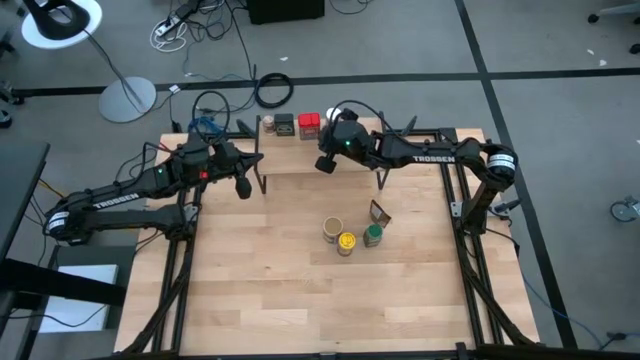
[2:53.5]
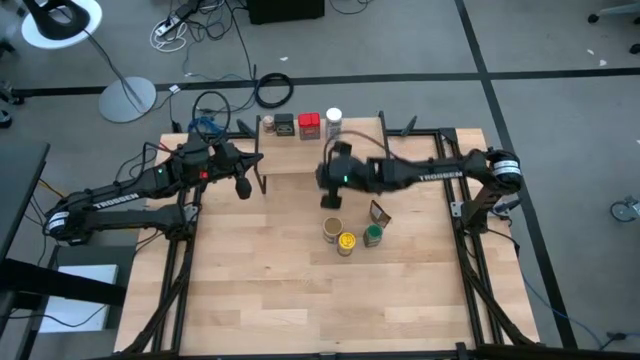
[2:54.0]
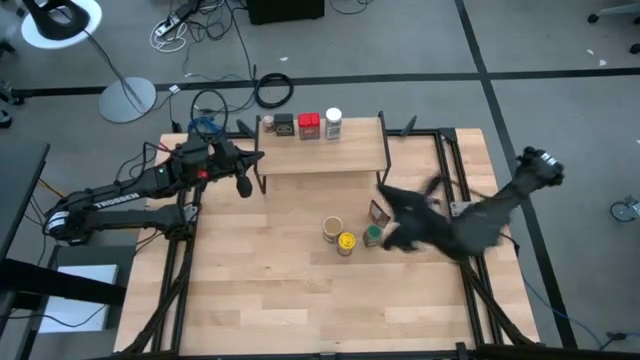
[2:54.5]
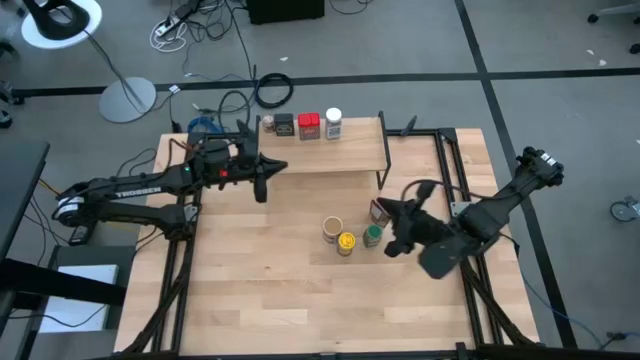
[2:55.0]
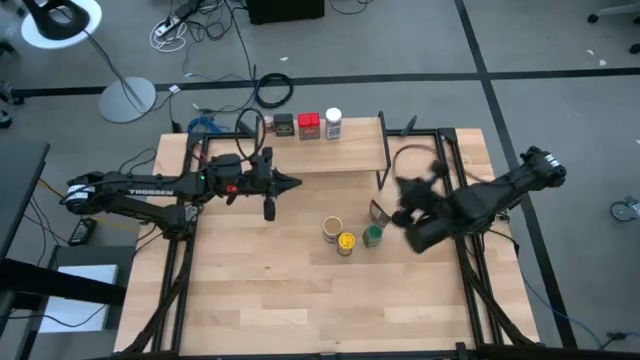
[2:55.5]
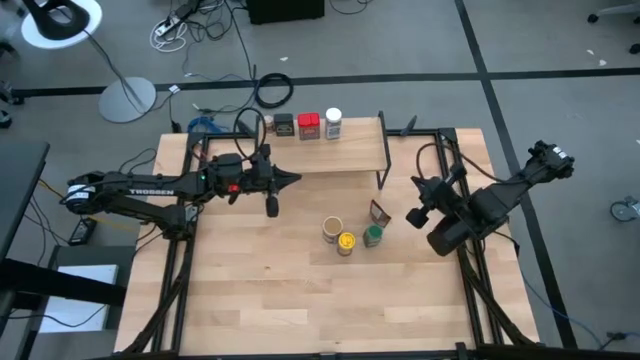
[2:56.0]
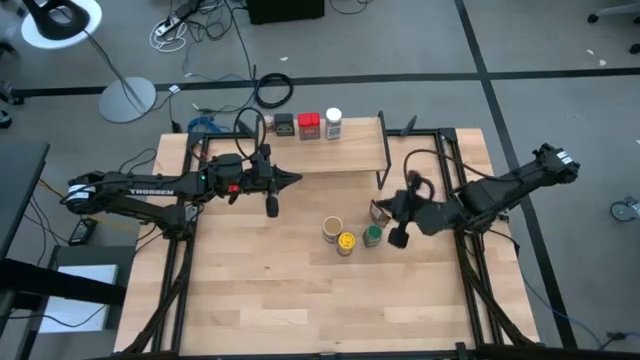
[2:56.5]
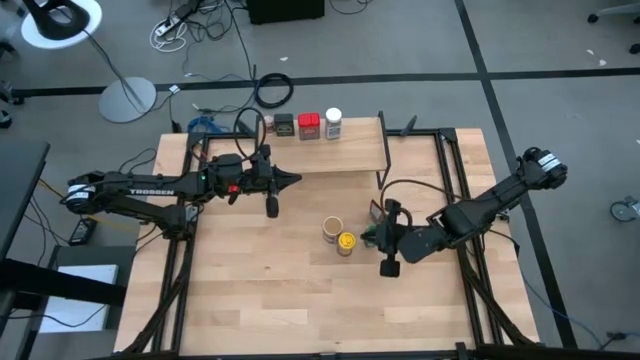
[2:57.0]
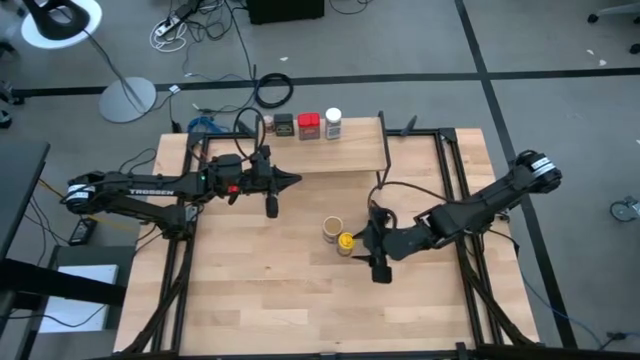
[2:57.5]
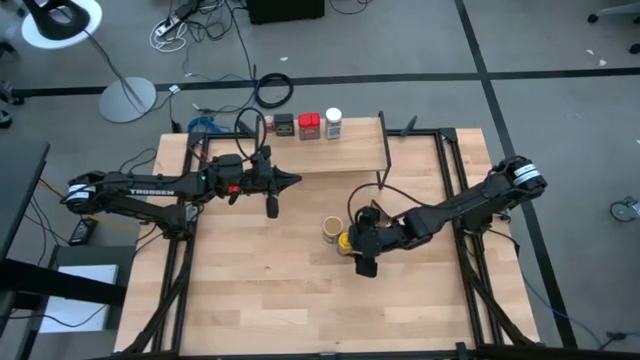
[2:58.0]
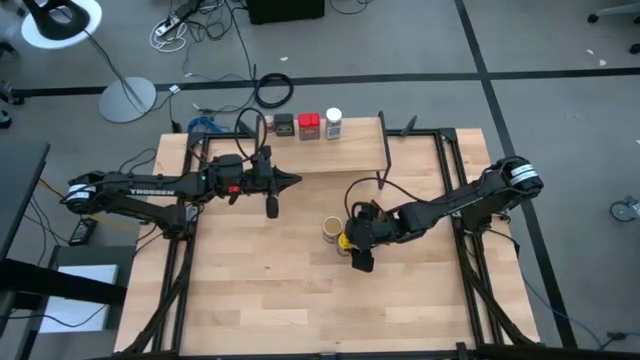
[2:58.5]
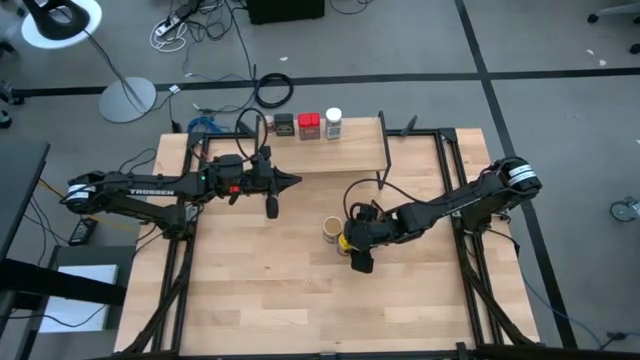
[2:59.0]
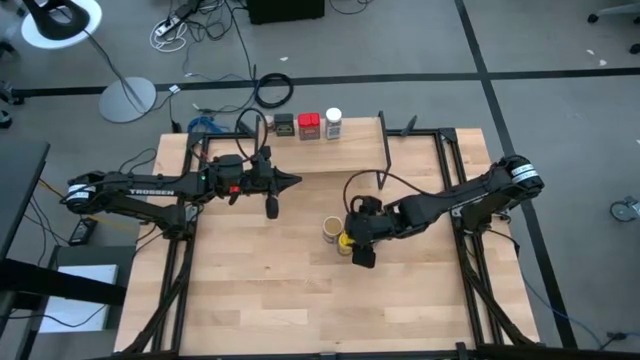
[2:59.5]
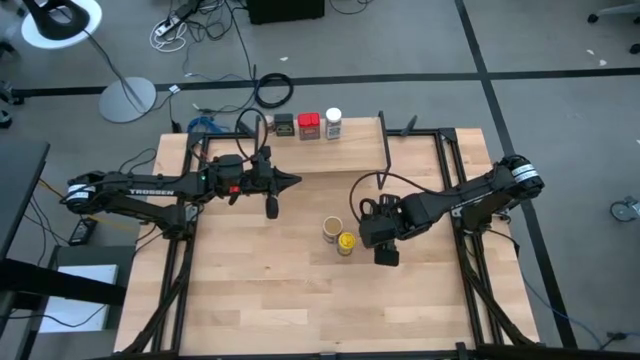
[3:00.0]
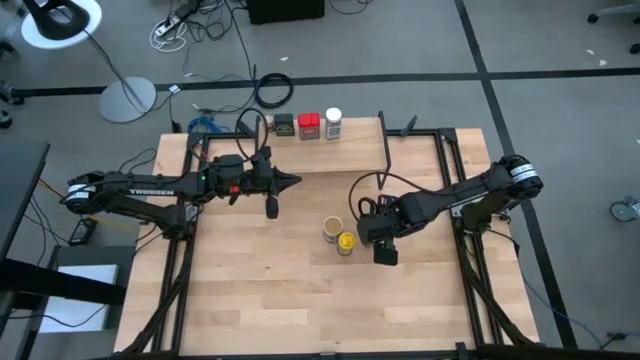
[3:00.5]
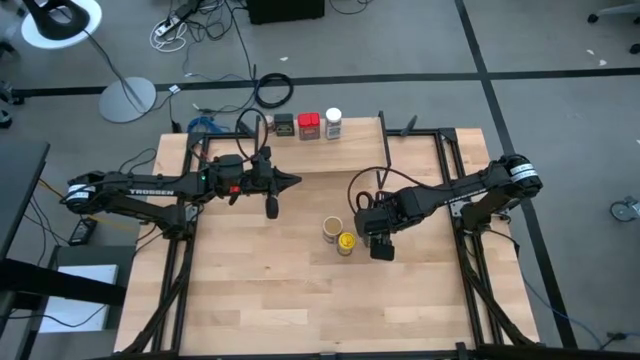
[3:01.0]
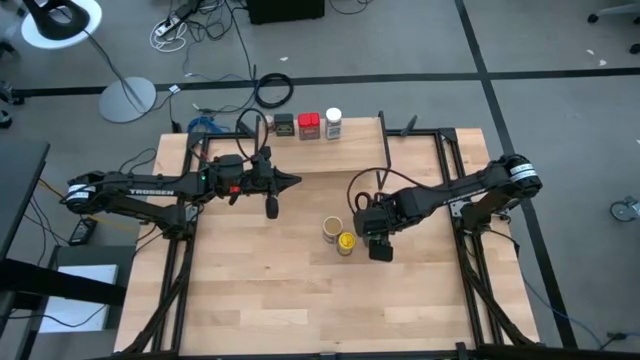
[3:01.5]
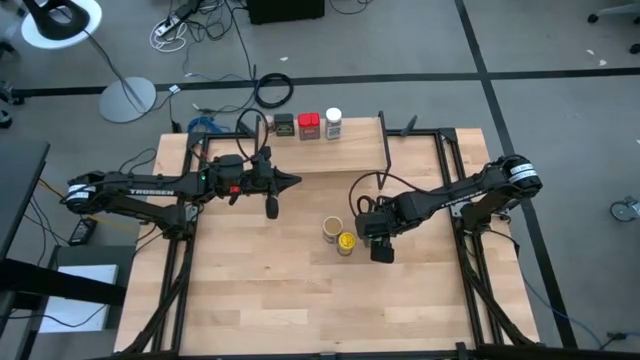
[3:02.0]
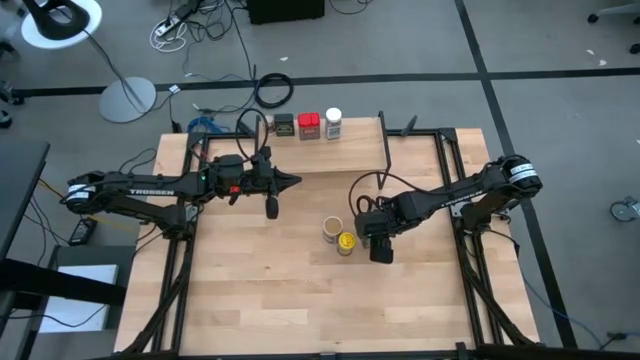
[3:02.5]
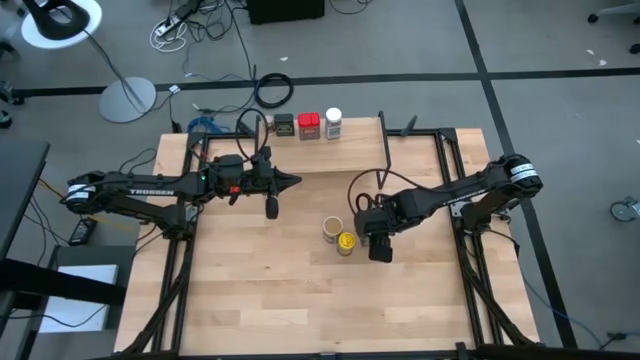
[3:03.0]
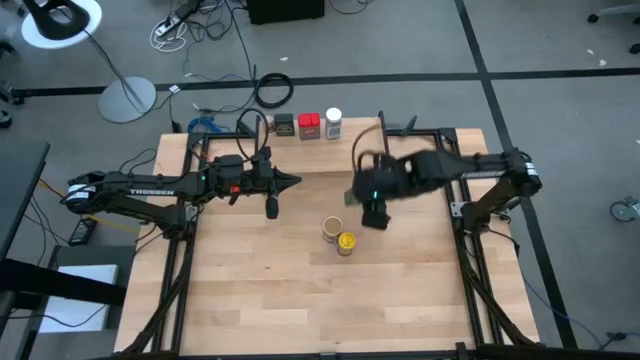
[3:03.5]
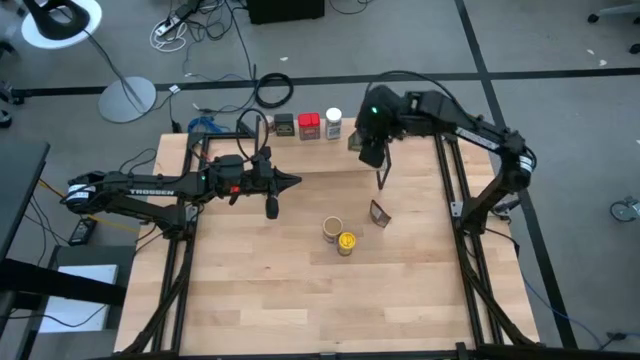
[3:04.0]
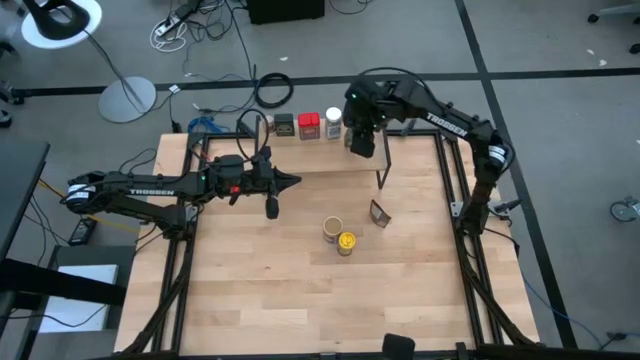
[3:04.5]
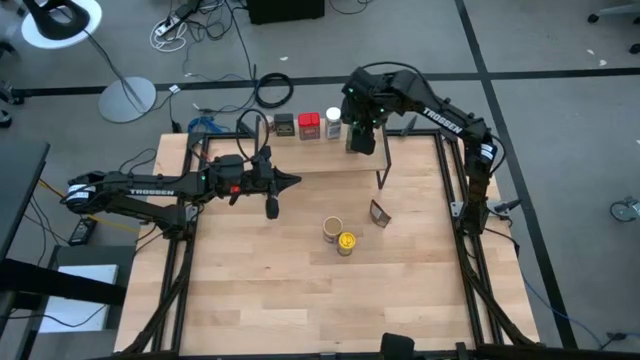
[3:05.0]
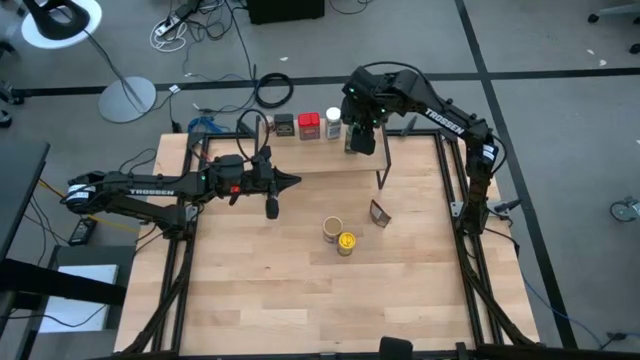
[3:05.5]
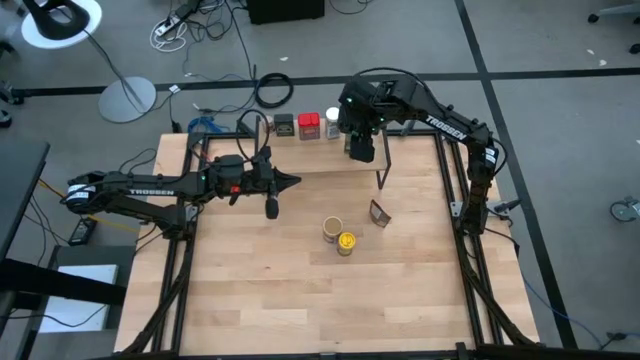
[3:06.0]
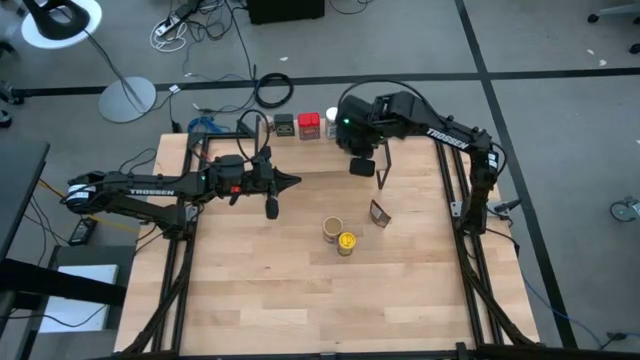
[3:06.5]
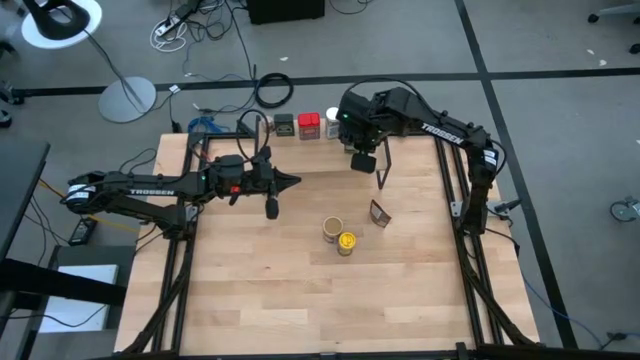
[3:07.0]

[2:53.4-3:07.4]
Task: Shelf spices
Put the green seasoning bottle on the shelf

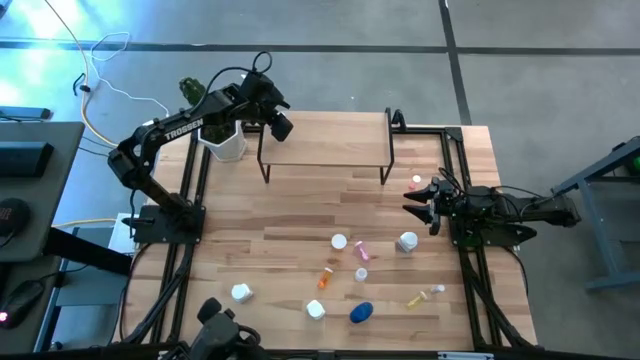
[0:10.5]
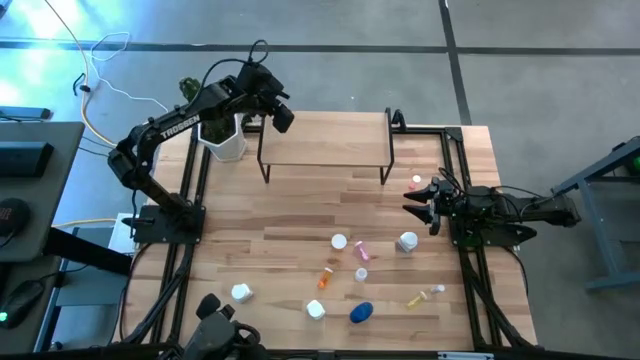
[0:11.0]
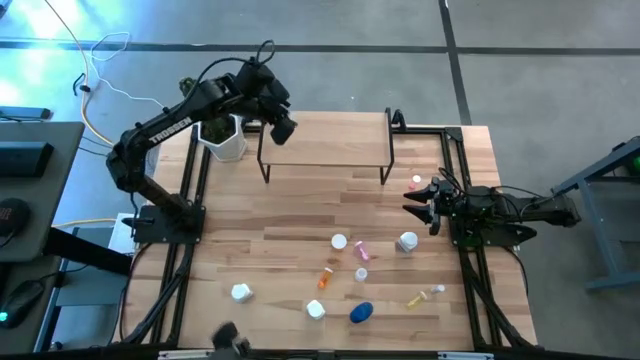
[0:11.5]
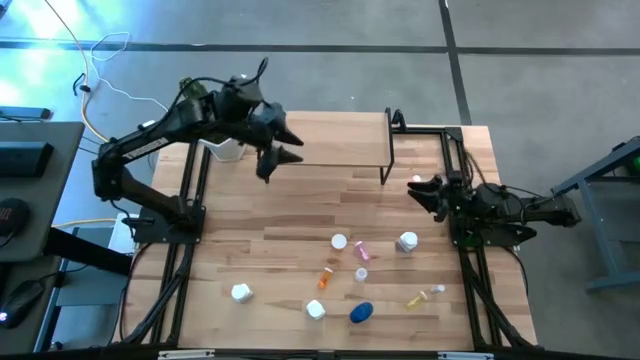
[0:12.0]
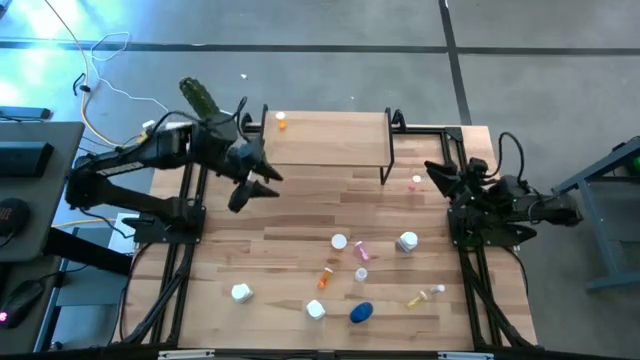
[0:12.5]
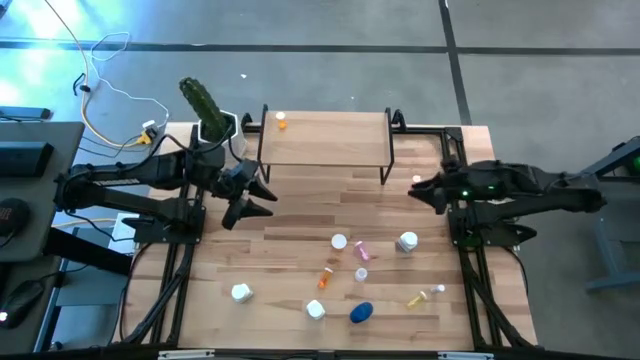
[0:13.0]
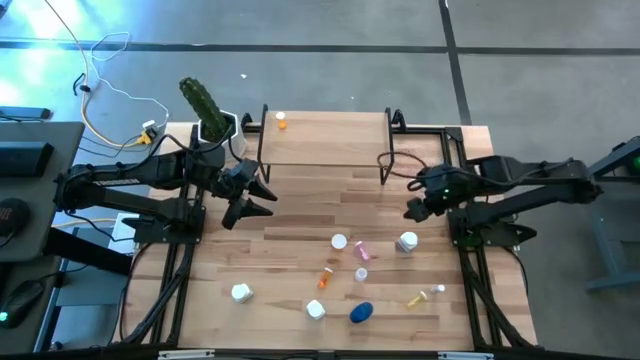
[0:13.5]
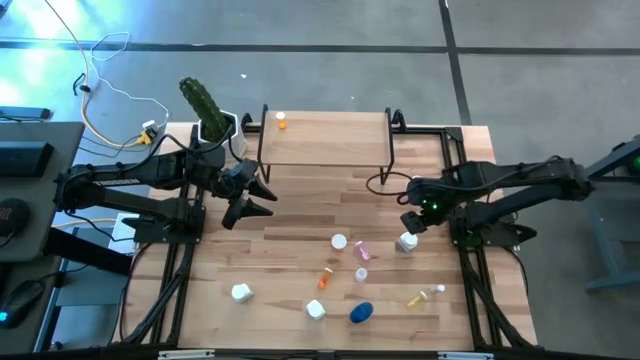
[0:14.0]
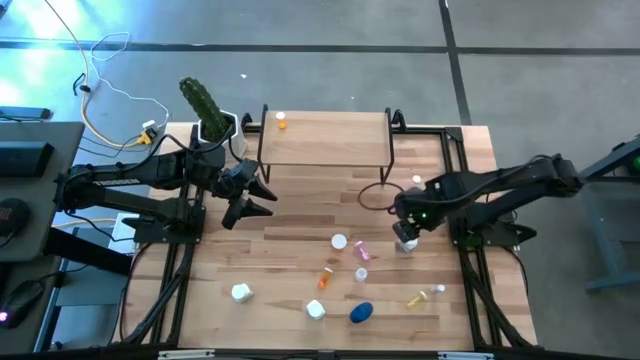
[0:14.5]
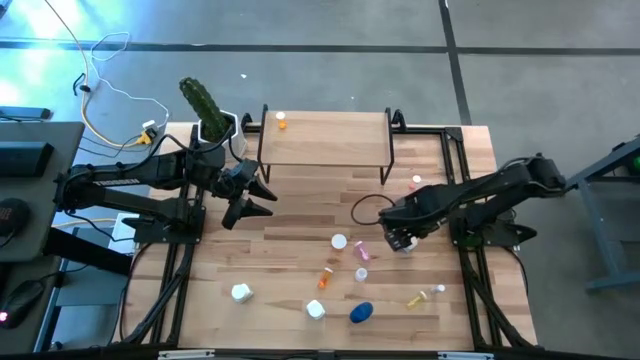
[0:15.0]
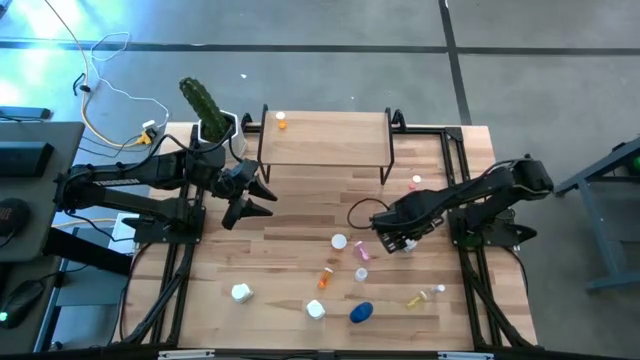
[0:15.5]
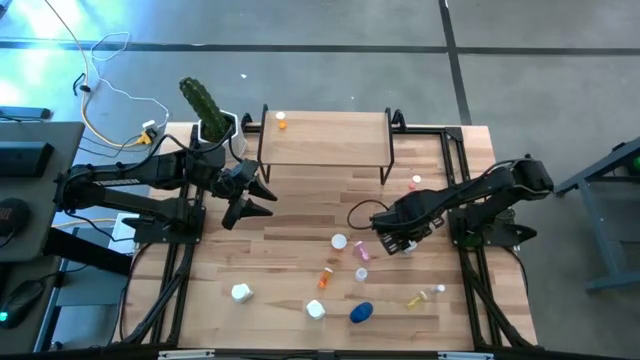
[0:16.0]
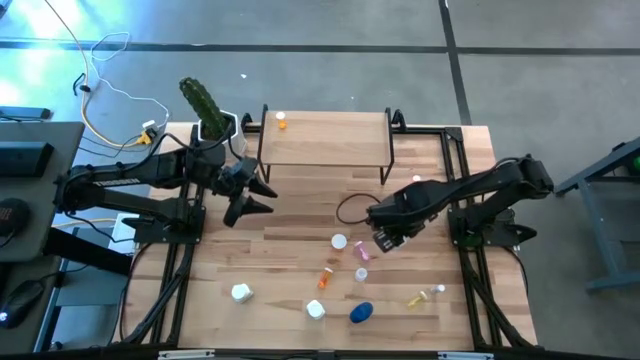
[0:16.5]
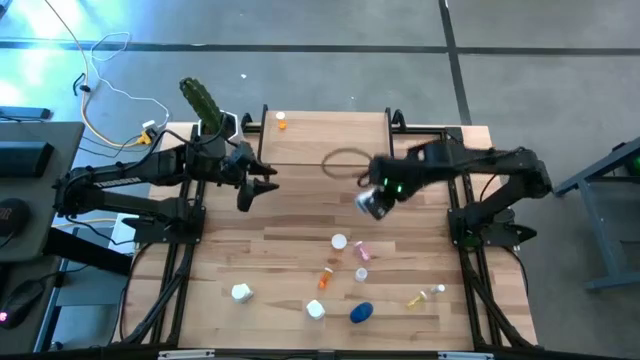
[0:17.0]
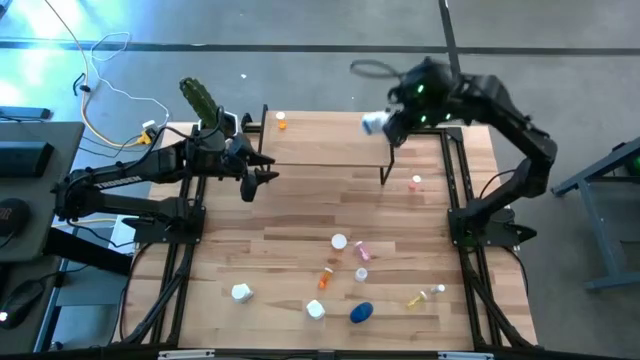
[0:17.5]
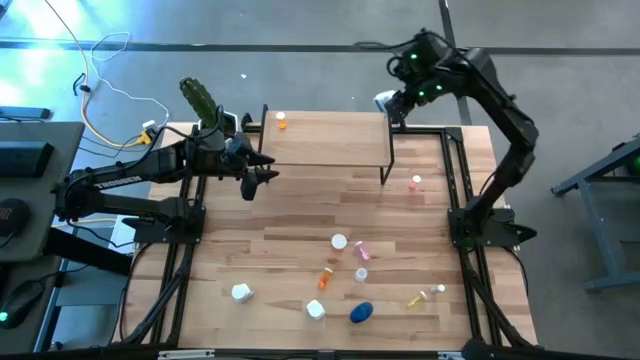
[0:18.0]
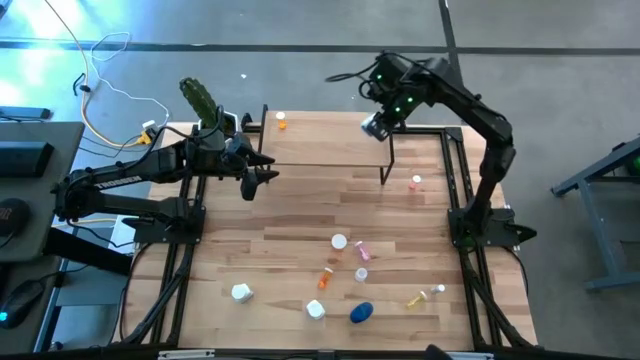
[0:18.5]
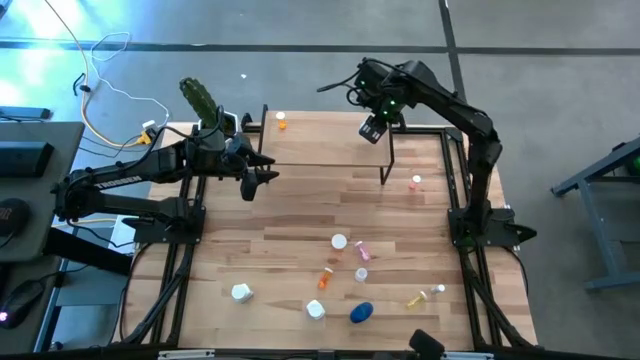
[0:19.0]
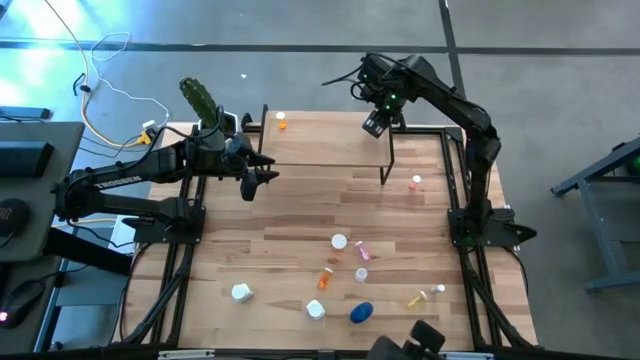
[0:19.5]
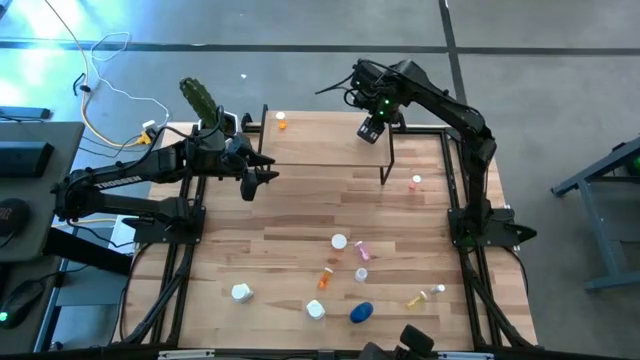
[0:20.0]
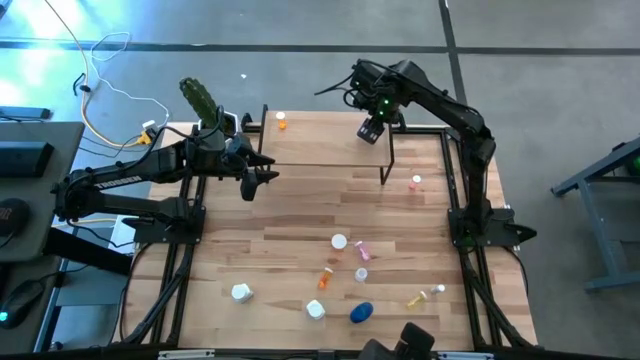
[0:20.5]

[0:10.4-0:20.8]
Task: Pick and place medicine bottles onto shelf by color
Put the right white blue pill bottle on the shelf
